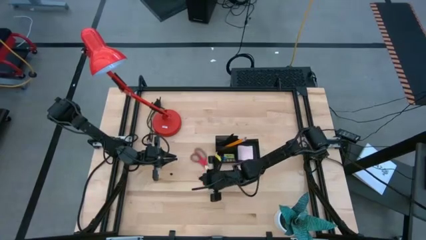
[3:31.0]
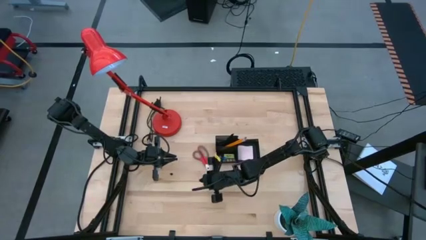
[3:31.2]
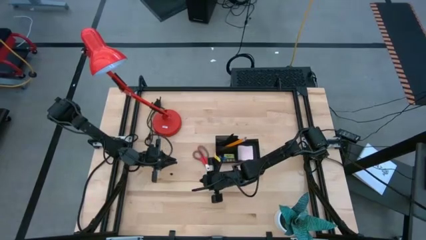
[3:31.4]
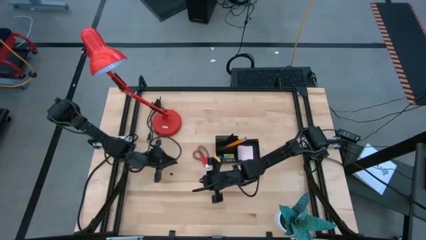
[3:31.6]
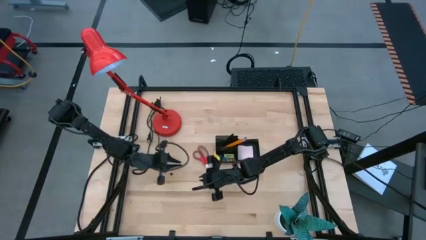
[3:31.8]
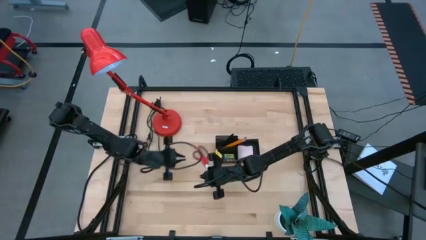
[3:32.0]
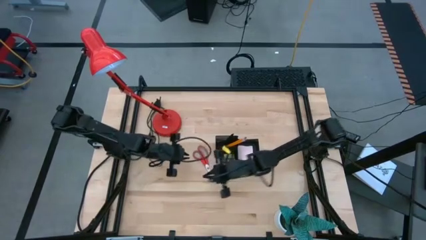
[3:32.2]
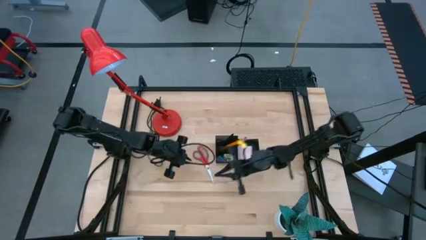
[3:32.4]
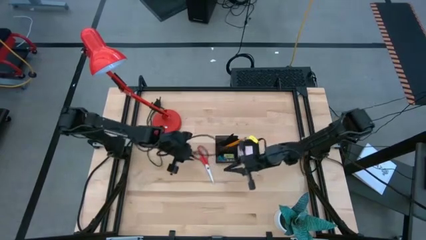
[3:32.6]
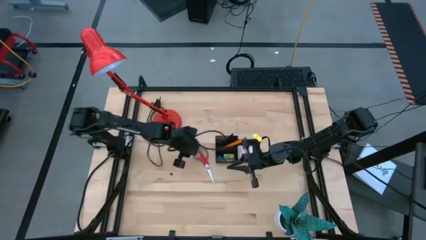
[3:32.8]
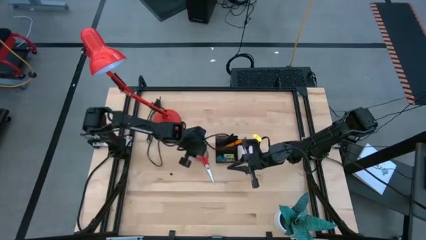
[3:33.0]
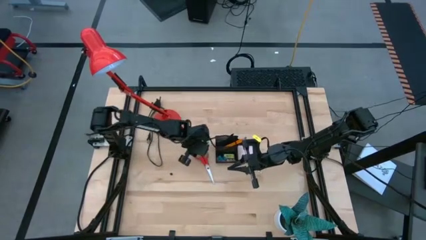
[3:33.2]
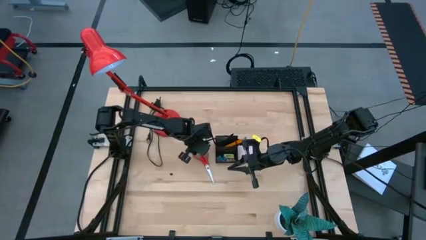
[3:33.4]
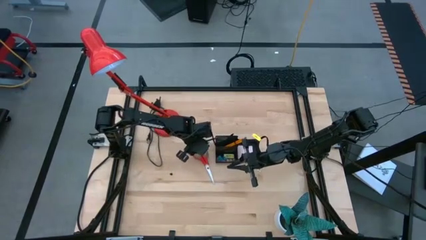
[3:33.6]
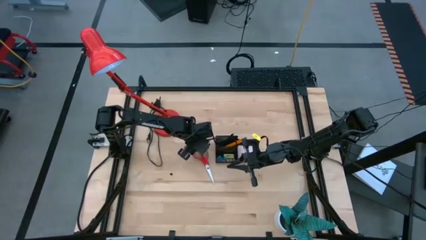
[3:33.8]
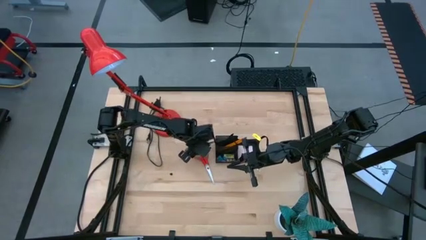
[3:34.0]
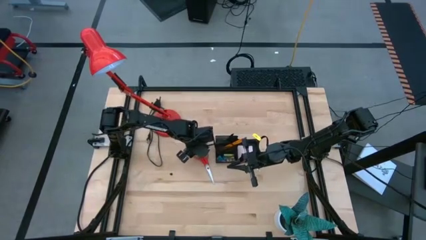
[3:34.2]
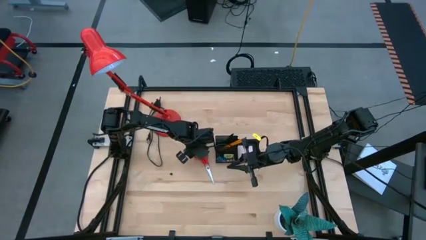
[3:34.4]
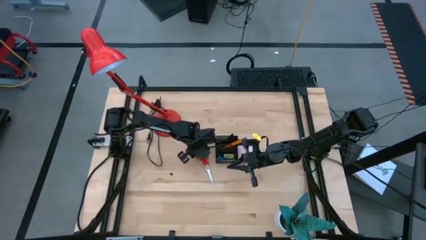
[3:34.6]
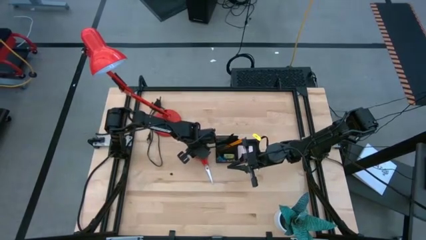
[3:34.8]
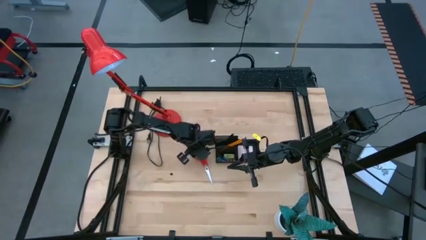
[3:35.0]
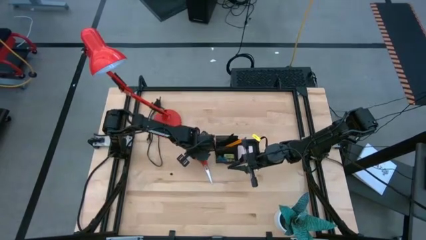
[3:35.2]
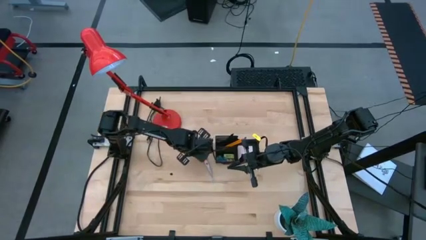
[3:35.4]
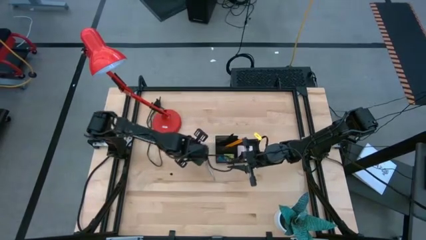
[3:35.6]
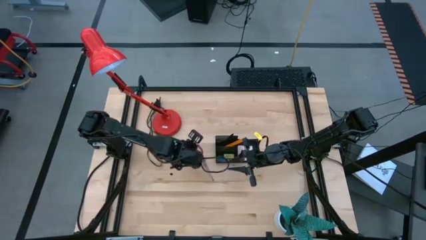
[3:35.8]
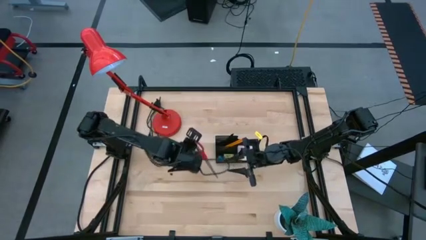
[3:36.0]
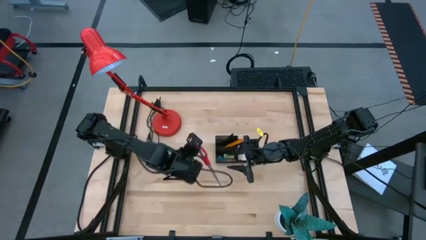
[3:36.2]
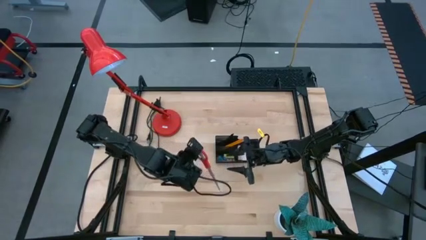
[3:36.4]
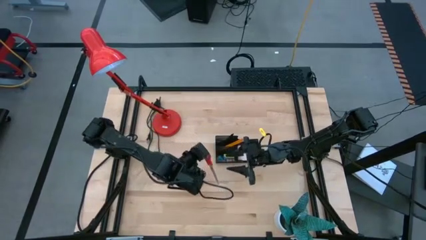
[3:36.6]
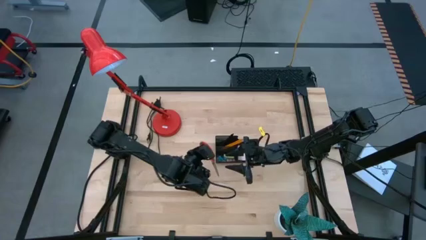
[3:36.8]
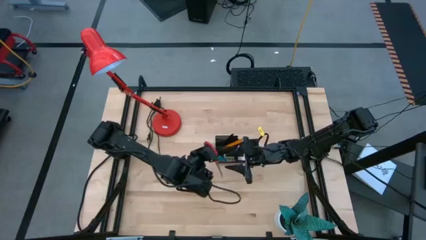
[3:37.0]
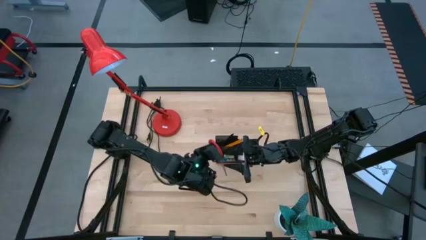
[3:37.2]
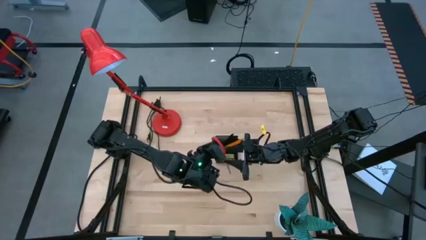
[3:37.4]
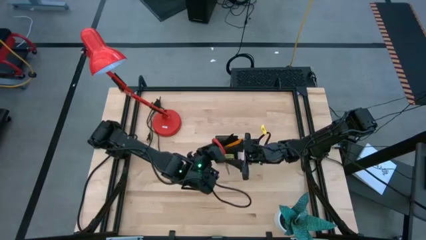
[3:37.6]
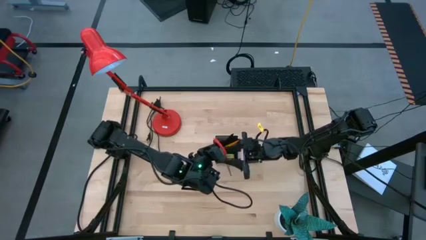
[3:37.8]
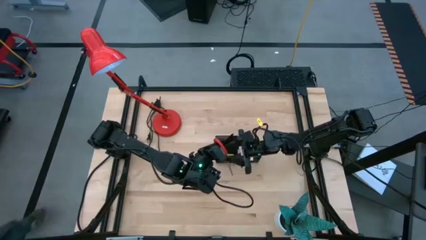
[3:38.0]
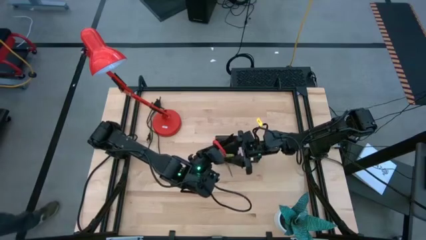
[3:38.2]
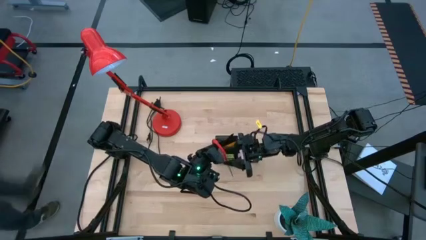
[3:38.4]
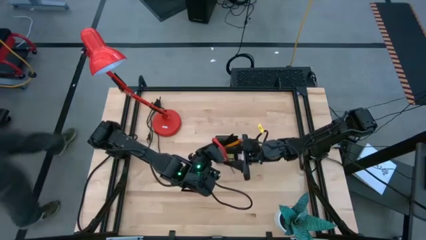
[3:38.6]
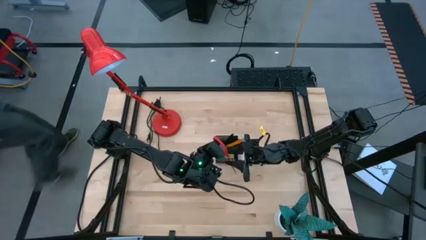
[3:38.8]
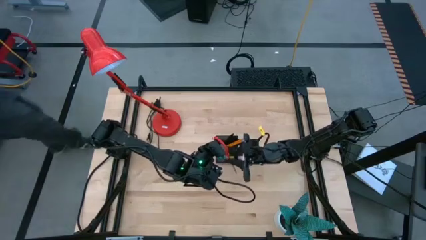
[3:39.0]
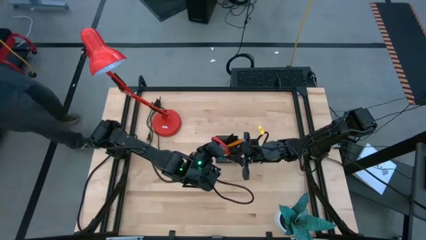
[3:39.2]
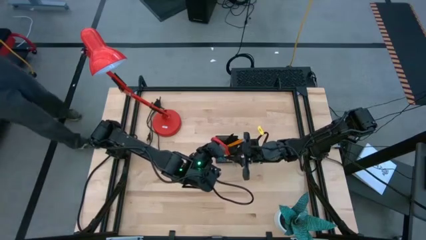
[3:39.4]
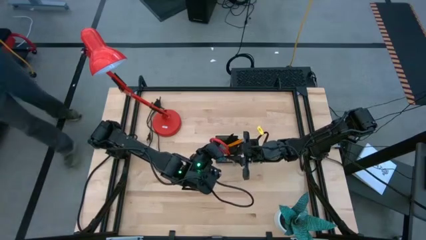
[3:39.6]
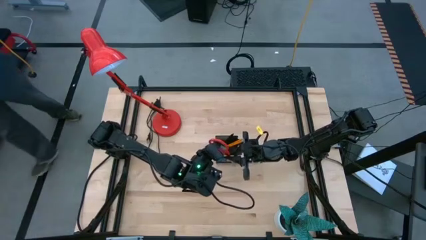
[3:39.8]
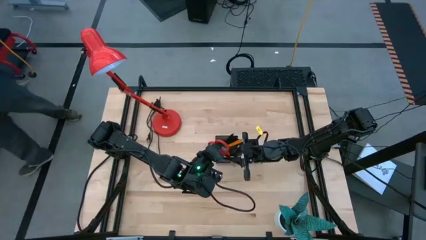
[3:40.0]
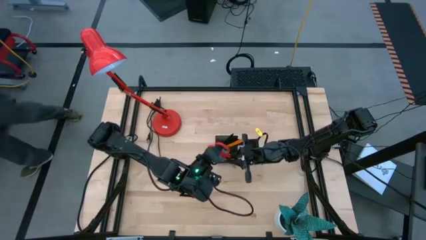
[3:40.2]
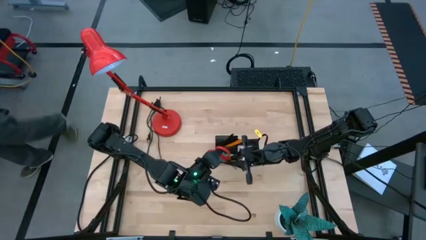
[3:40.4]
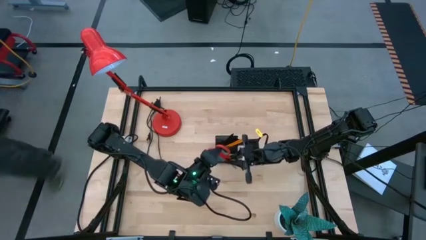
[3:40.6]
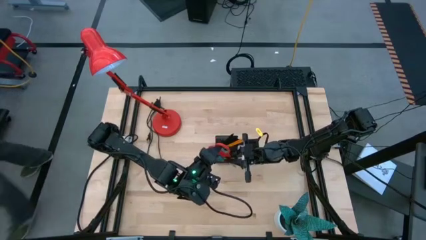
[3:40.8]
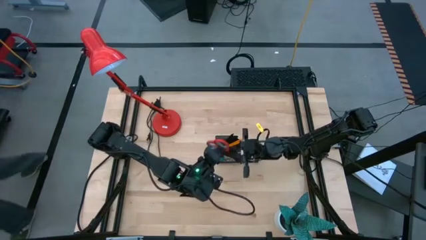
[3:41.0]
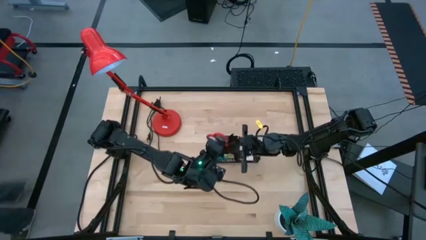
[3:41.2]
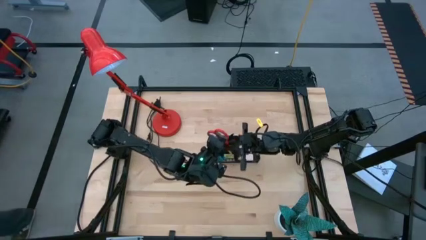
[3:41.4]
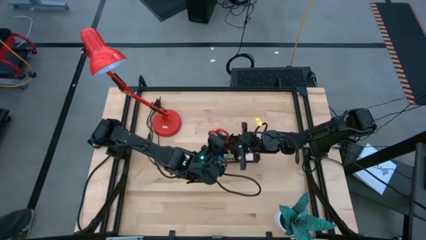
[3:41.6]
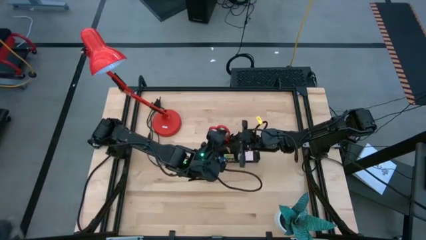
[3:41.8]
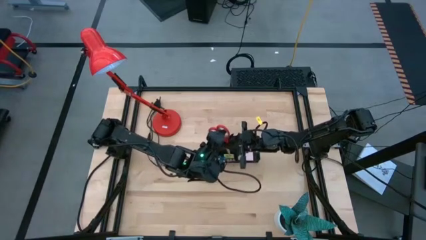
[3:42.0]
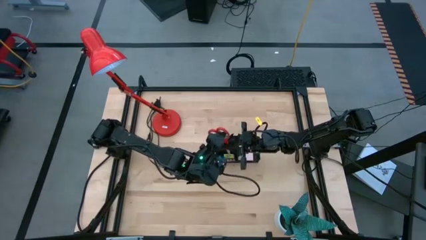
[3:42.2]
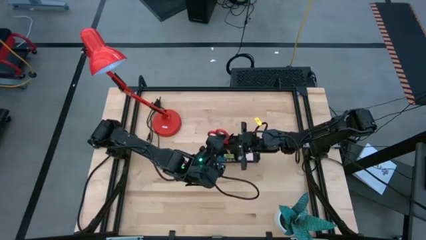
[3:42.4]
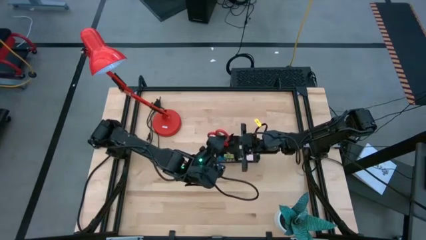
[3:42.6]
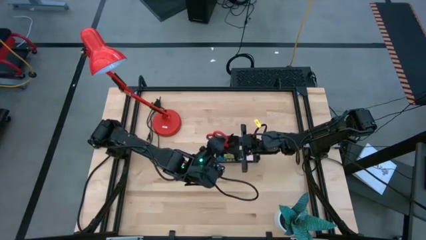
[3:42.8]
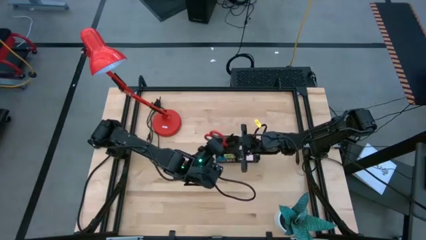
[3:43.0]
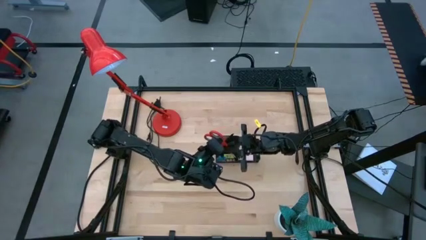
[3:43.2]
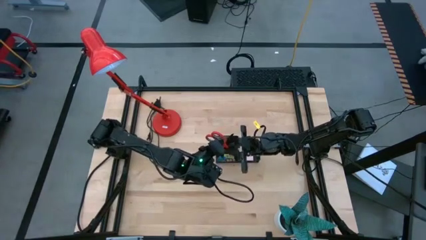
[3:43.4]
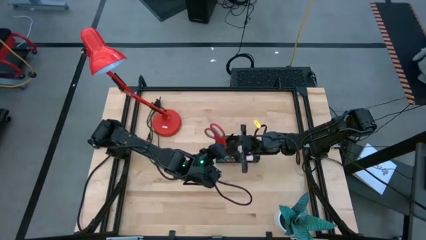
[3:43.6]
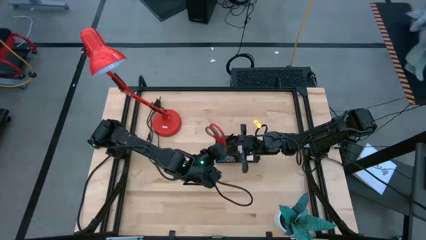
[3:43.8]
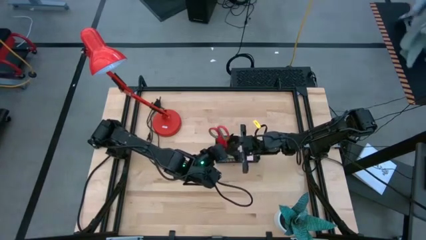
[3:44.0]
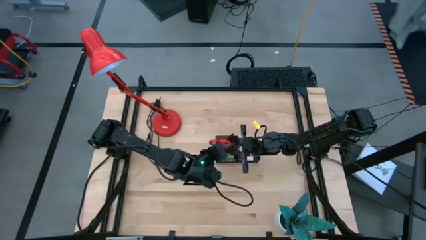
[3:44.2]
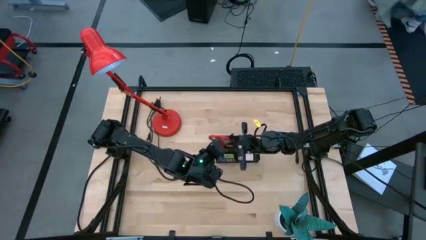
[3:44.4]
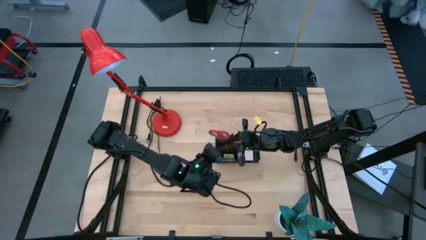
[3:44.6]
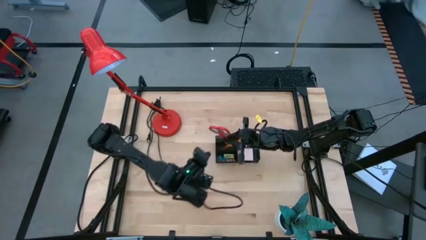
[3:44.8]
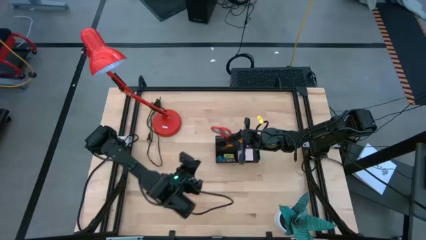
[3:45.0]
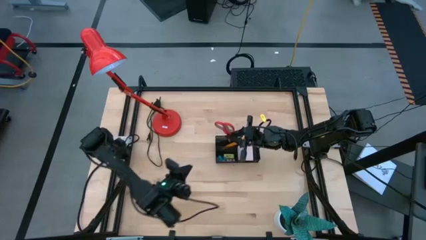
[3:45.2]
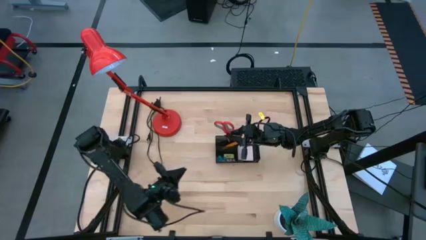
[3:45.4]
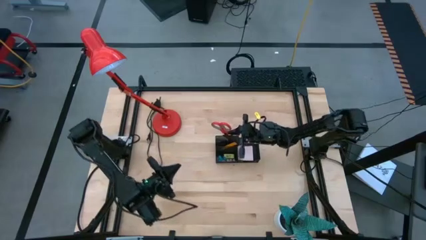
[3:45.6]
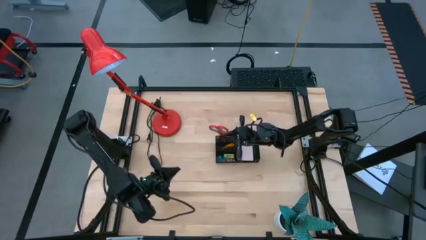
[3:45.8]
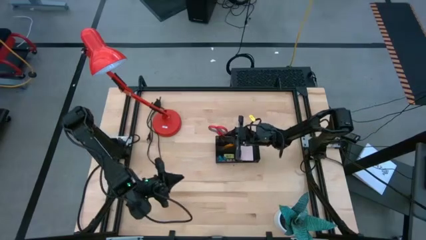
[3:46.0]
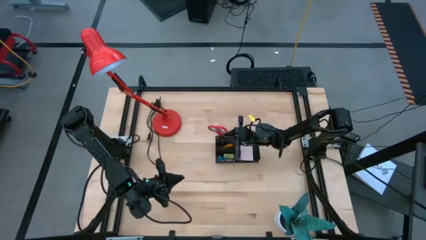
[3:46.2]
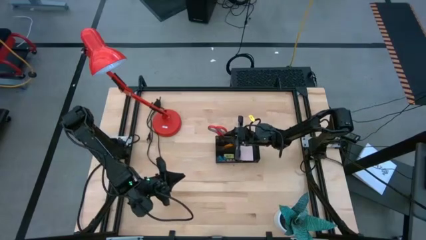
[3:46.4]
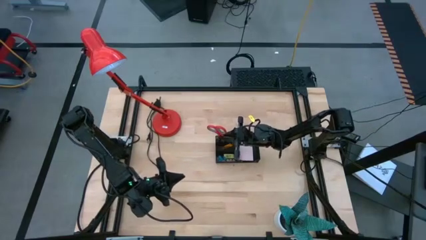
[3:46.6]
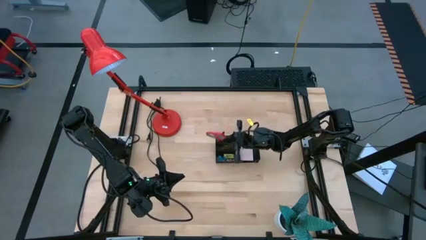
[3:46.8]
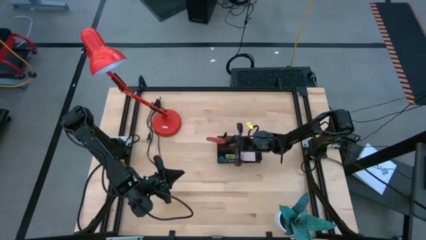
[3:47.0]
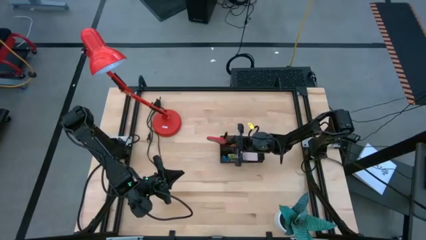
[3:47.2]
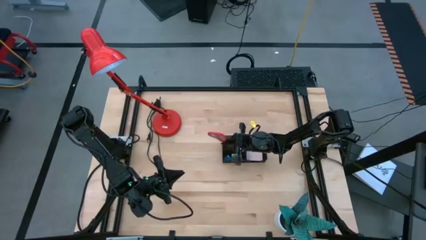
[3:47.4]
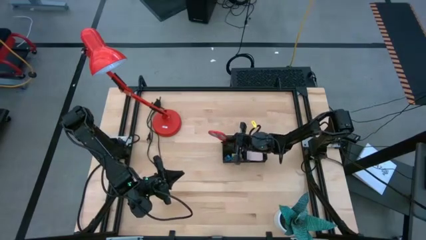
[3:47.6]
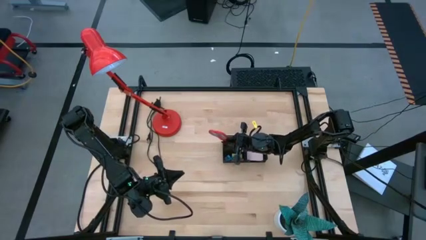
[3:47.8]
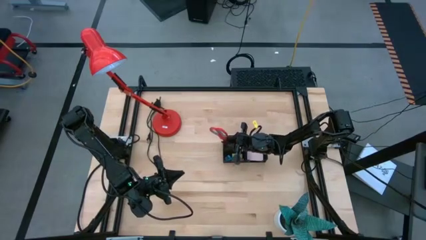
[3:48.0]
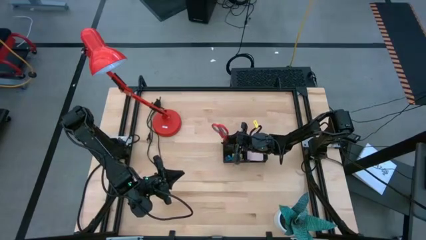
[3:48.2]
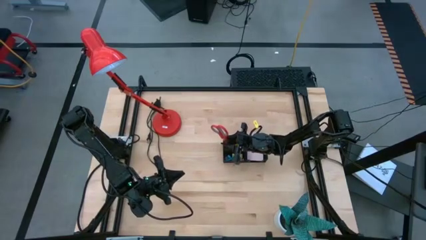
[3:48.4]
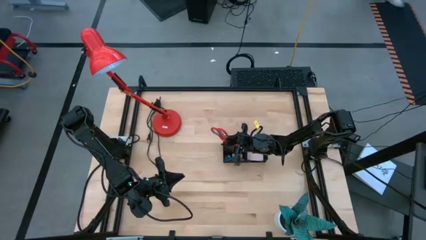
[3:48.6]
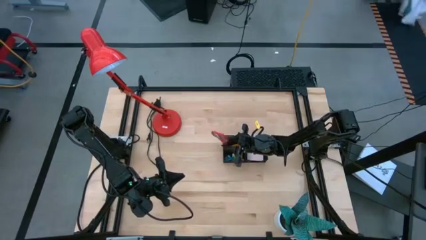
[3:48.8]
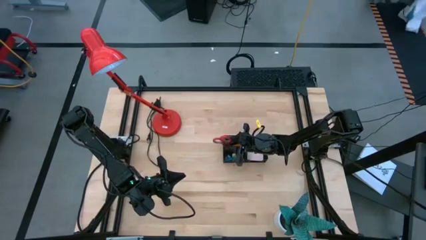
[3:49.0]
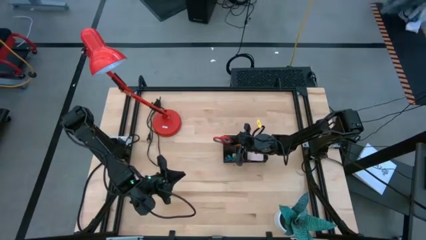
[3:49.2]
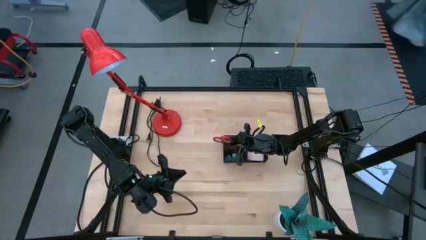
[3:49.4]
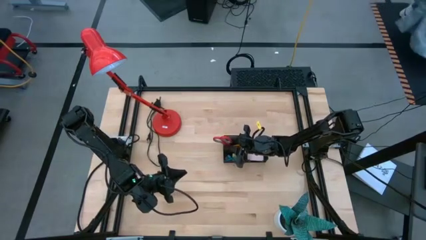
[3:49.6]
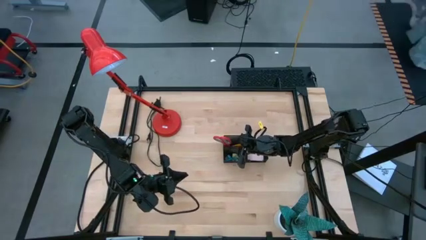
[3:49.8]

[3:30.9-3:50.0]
Task: Pick and place office supplies into organizer
Put the red scissors into the black desk organizer
